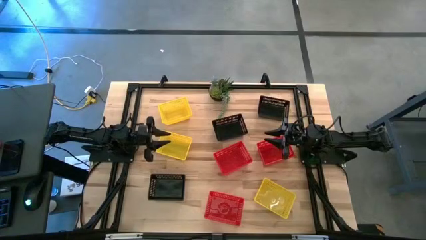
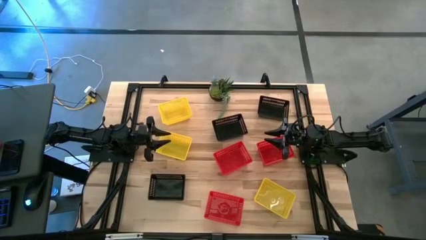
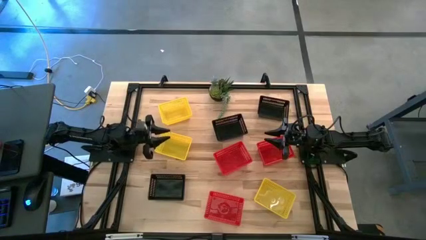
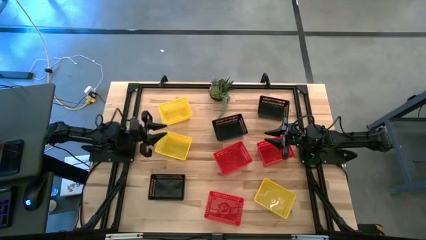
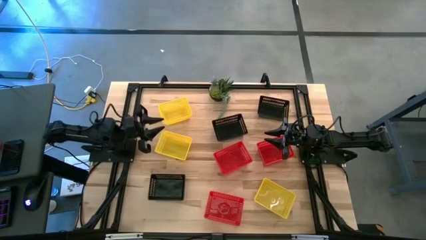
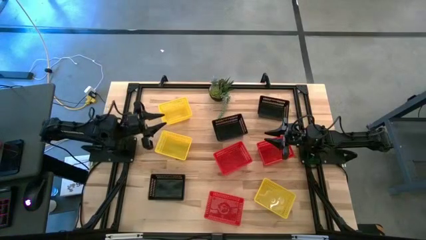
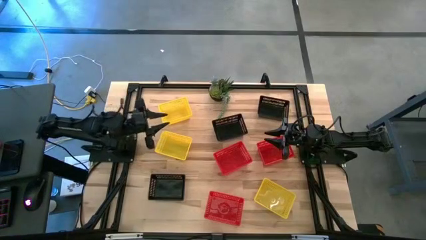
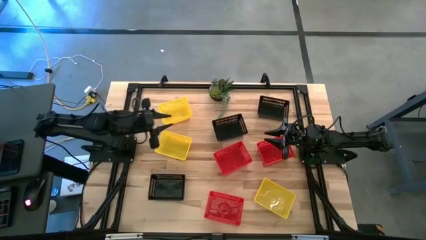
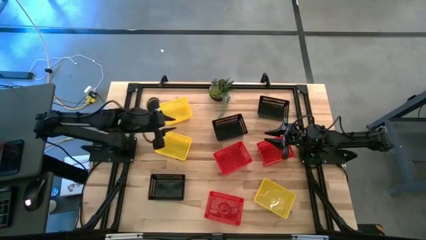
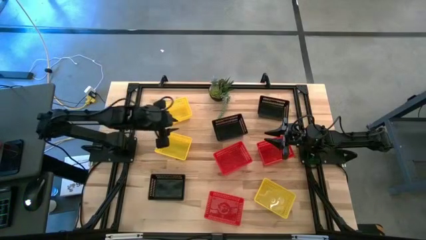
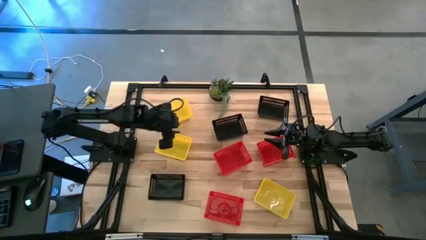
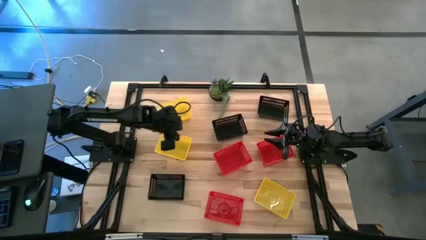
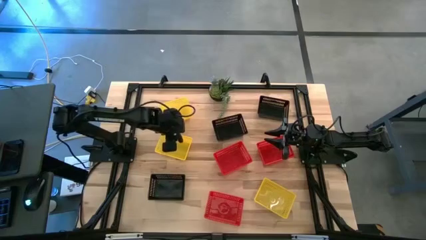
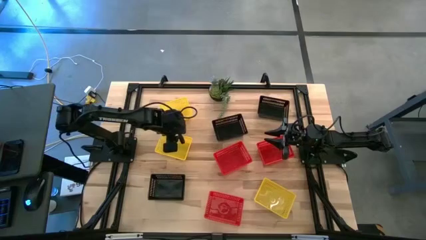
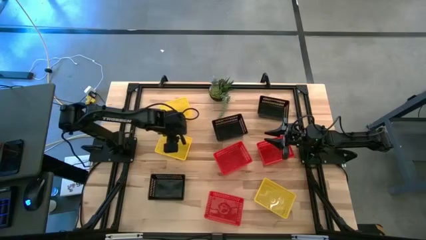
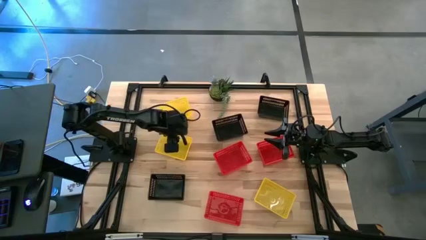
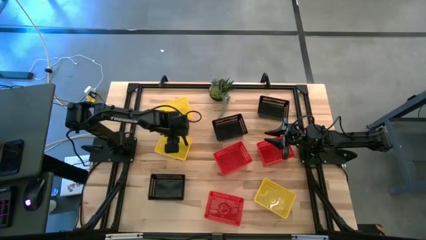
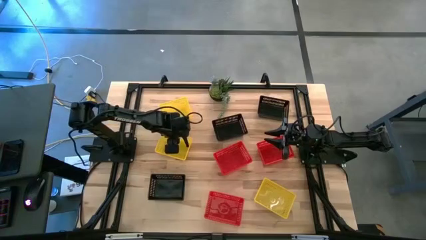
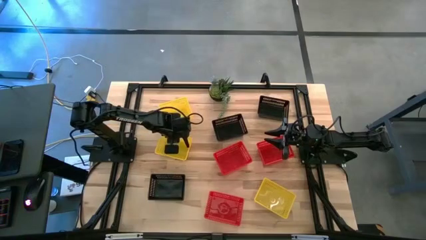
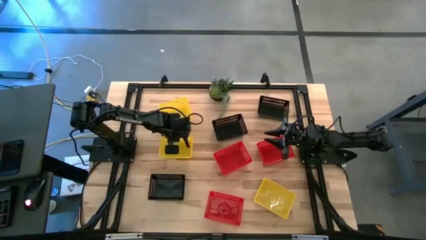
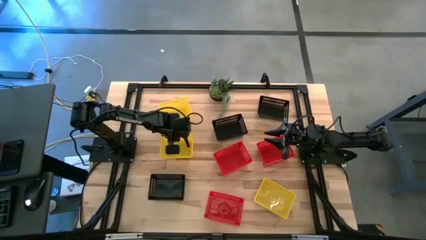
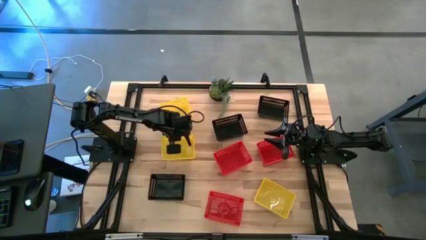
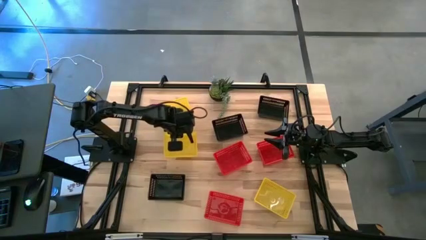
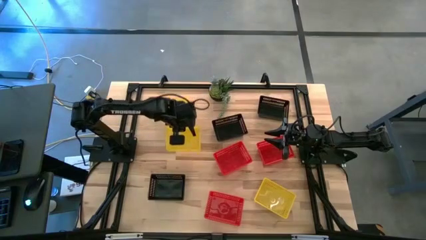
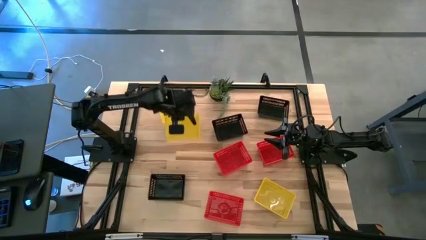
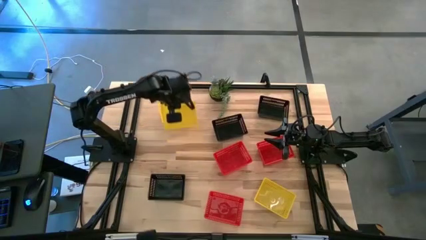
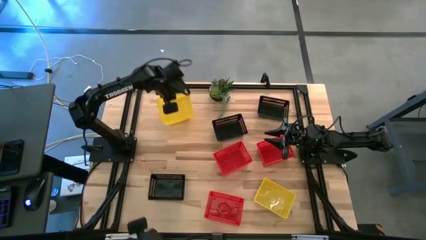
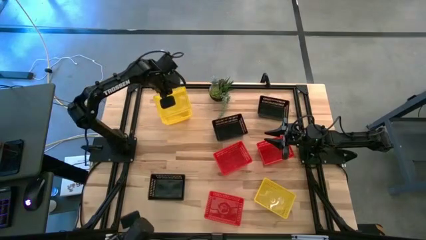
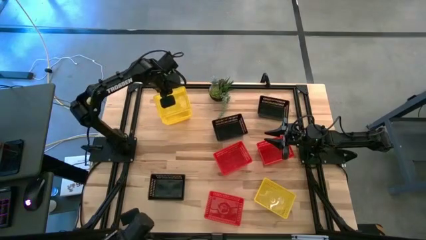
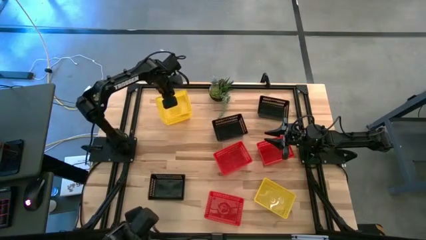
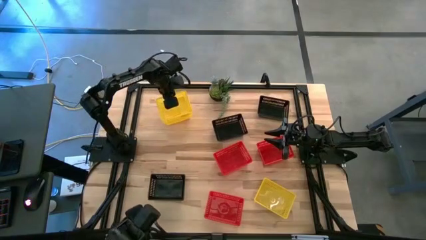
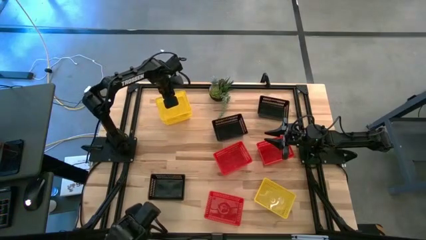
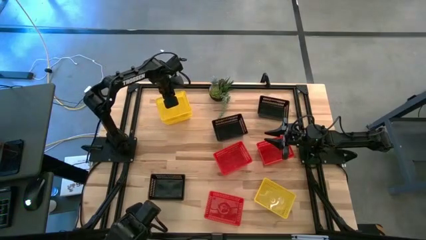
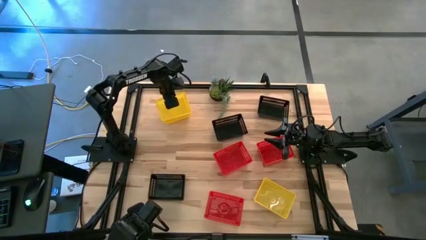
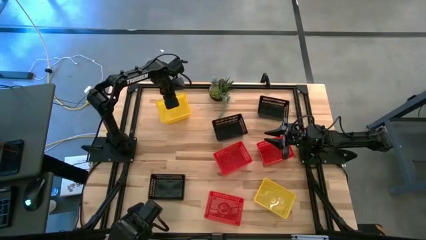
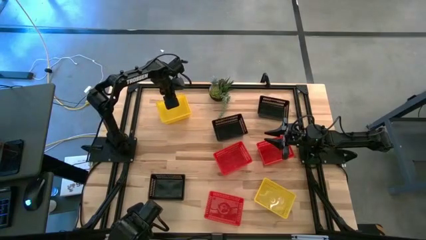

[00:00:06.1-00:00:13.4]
Stack the middle yellow bin on top of the top yellow bin on the table

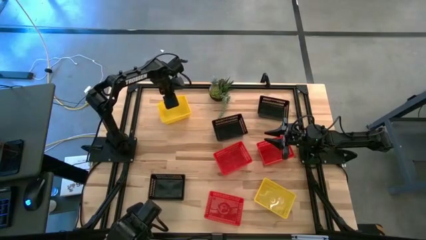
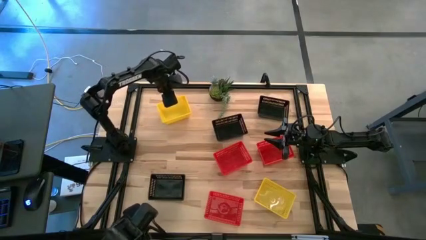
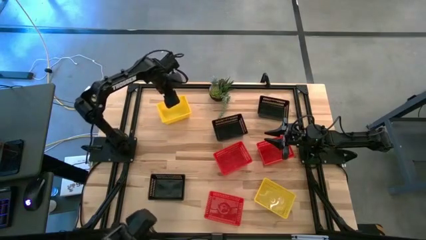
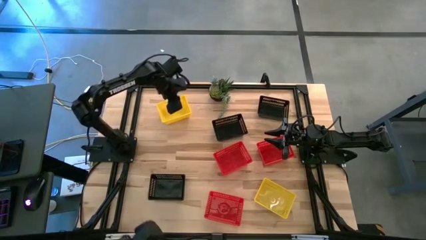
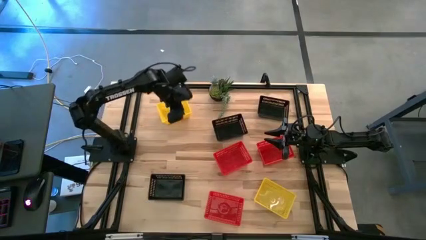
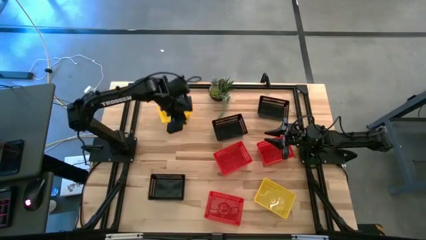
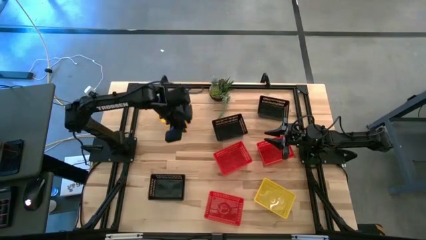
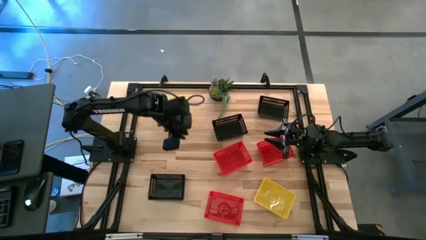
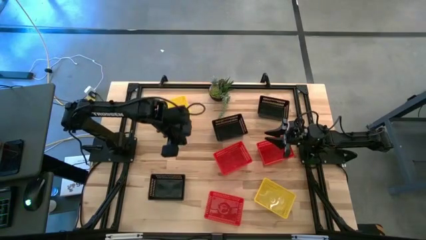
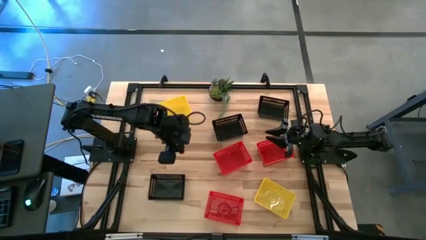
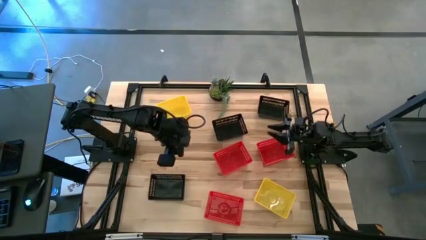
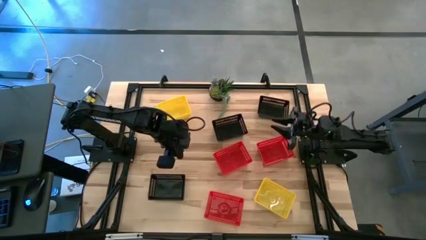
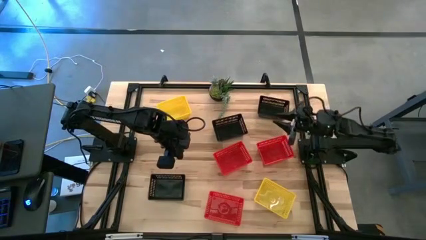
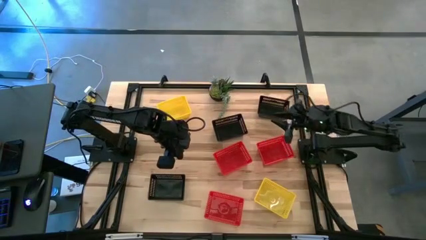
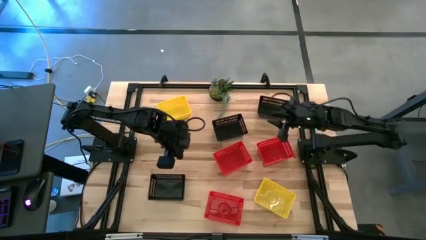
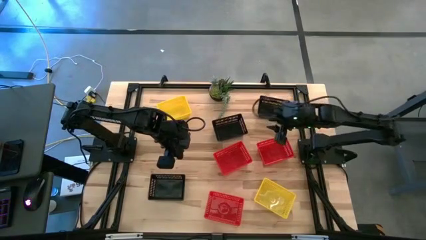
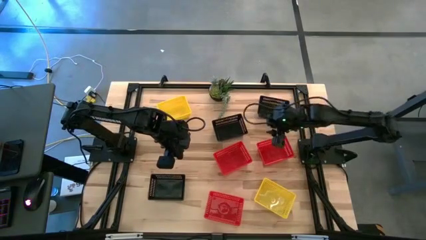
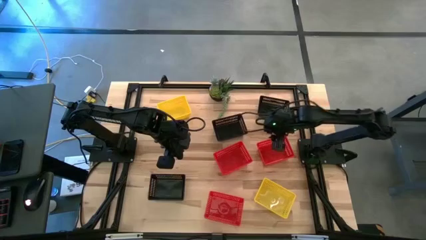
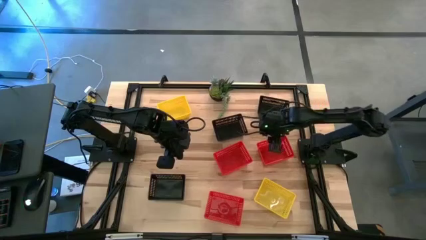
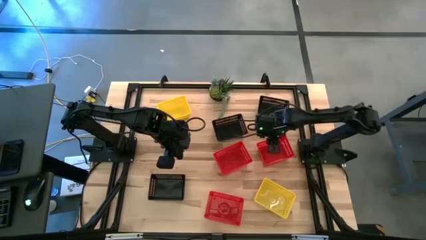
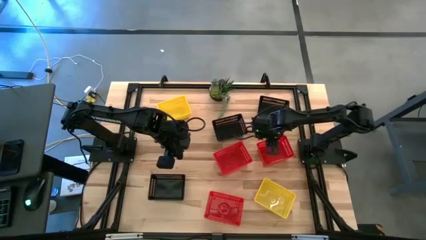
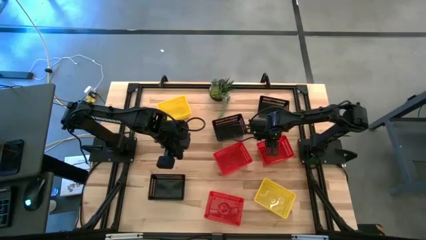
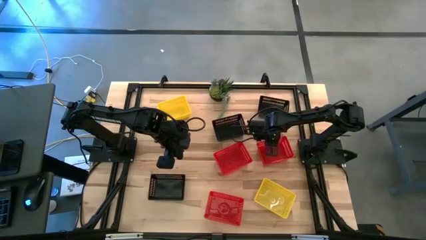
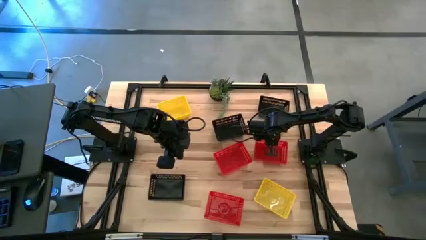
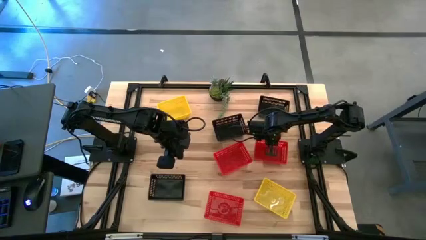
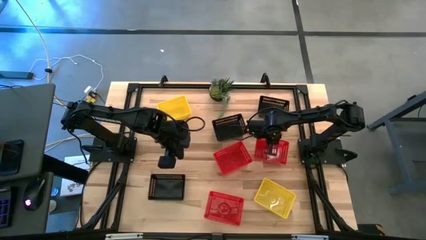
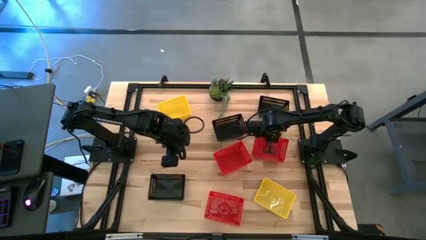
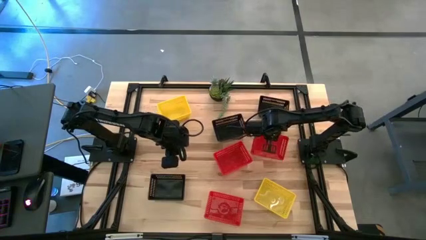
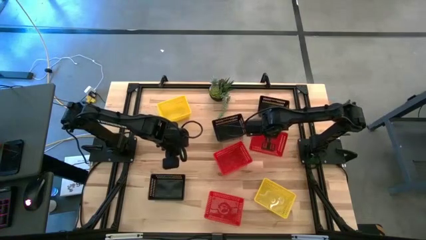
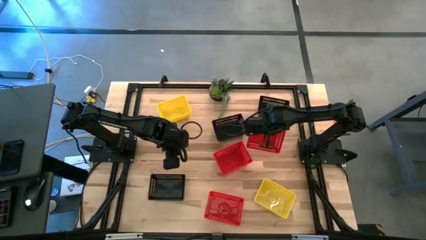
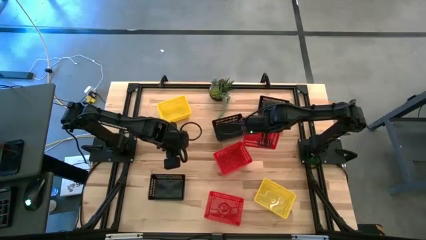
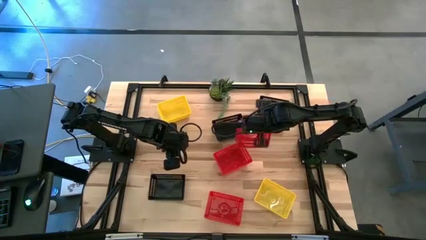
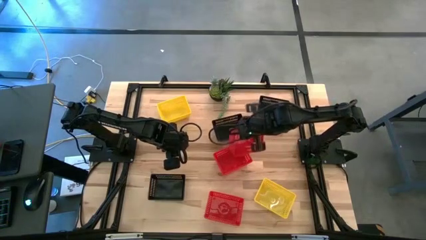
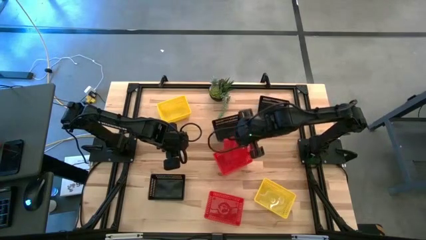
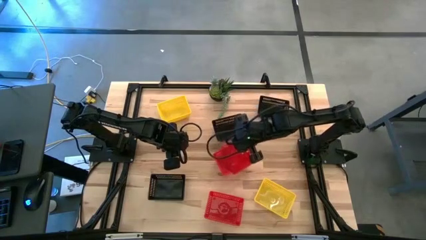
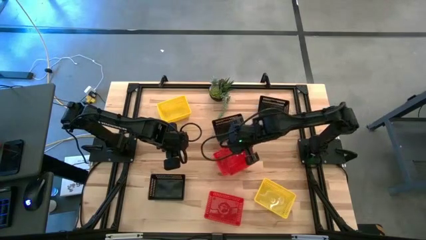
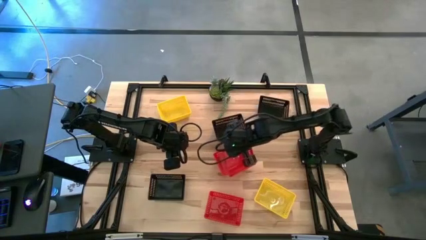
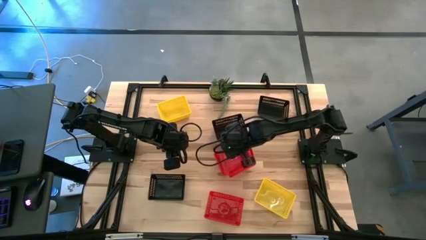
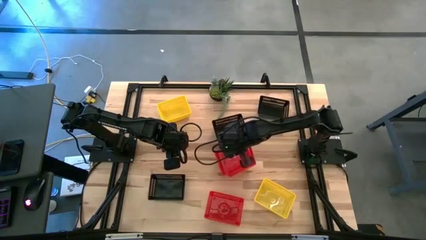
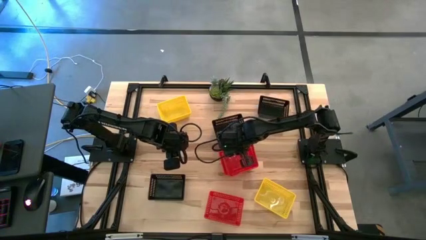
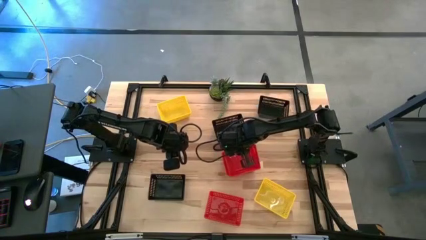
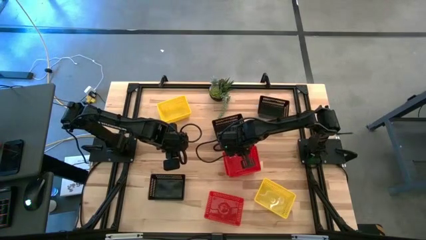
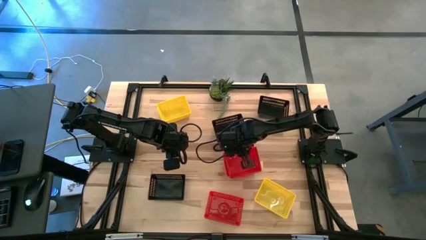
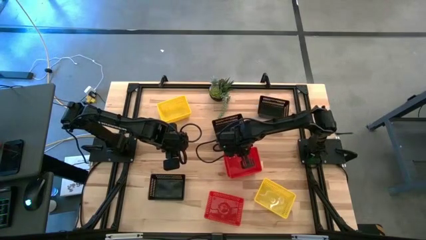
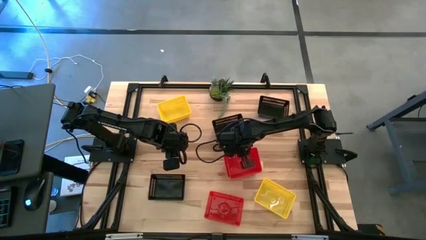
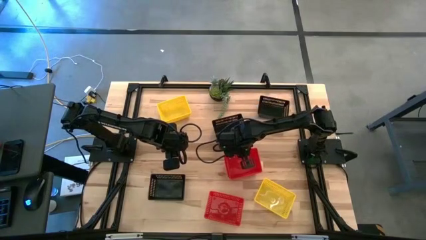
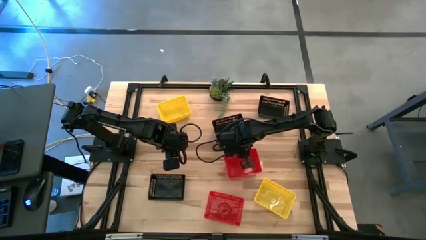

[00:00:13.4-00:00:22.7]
Stack the top right red bin on top of the top left red bin on the table
